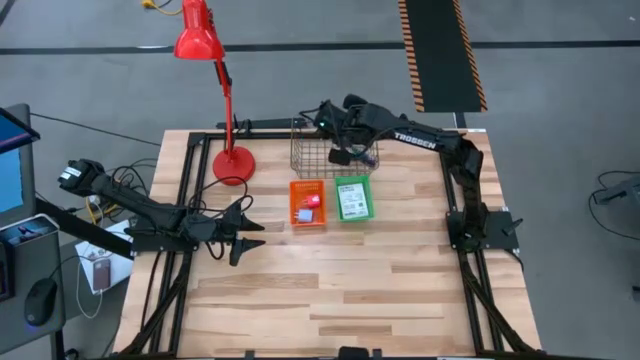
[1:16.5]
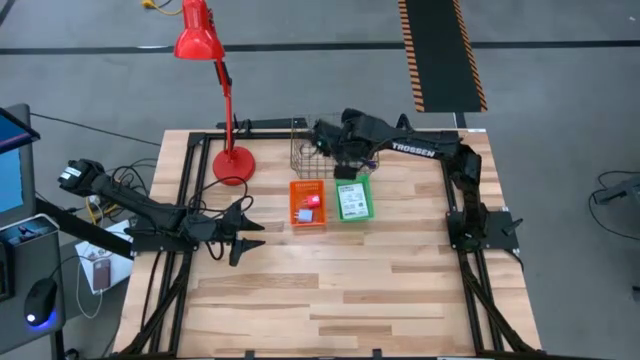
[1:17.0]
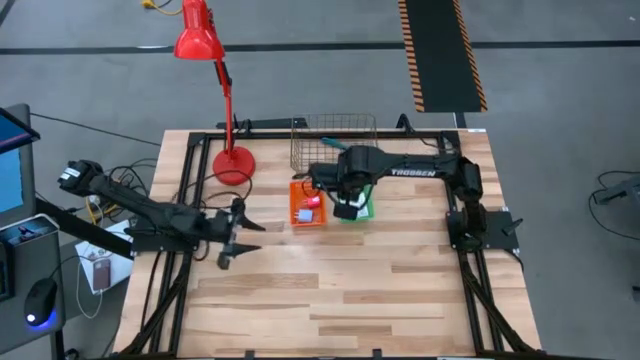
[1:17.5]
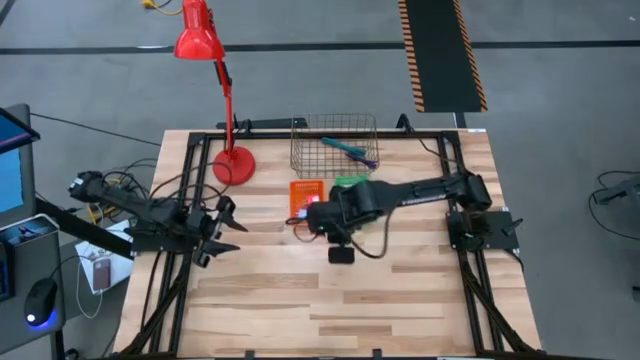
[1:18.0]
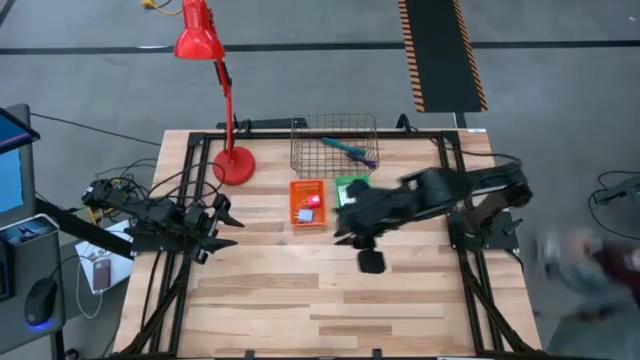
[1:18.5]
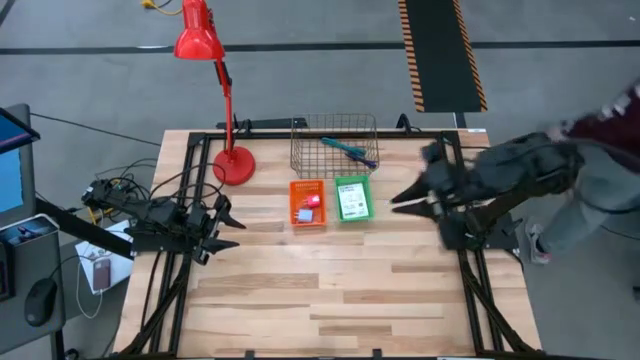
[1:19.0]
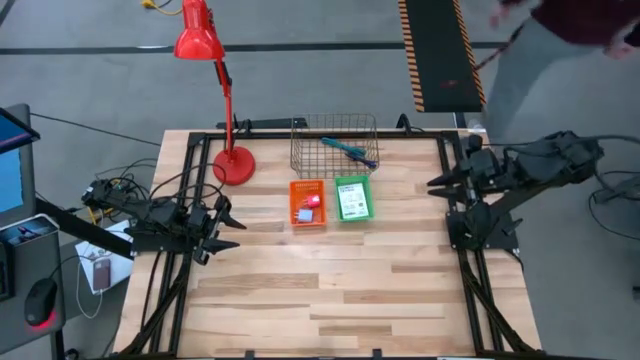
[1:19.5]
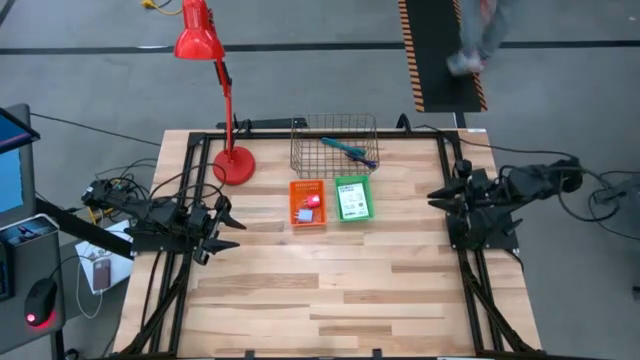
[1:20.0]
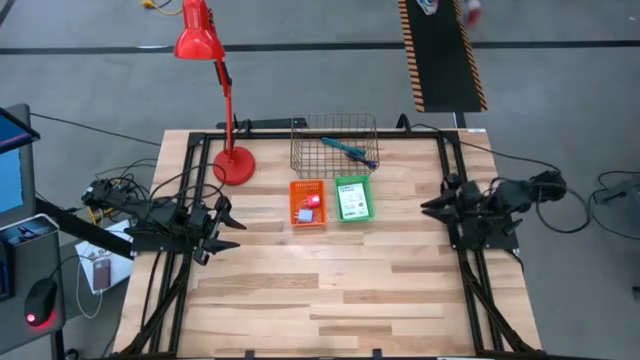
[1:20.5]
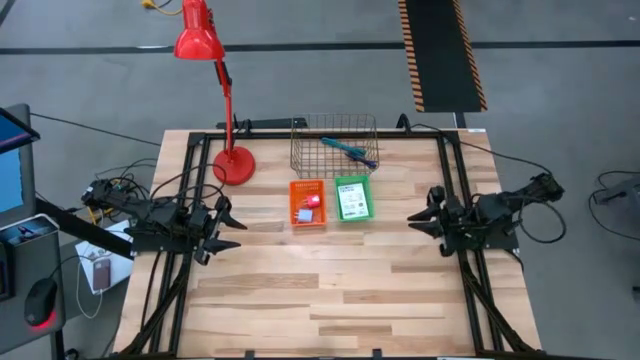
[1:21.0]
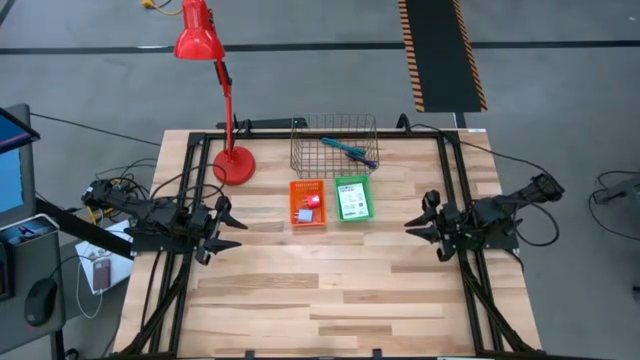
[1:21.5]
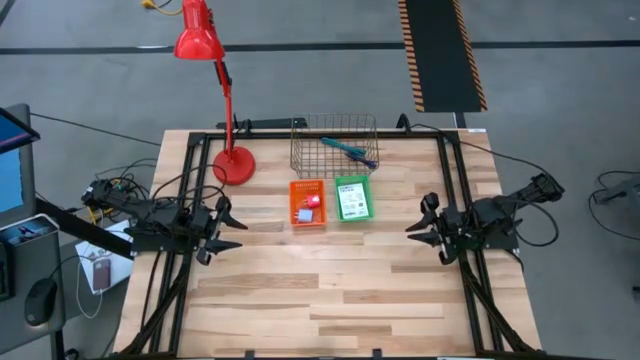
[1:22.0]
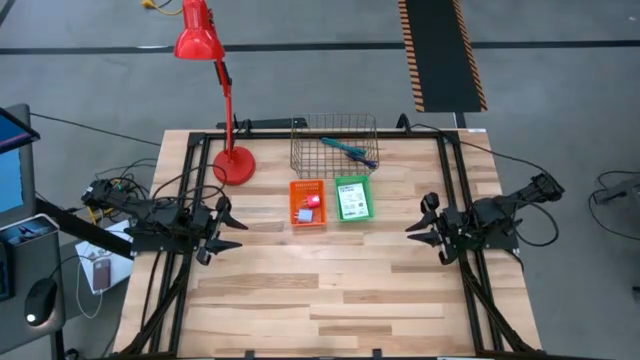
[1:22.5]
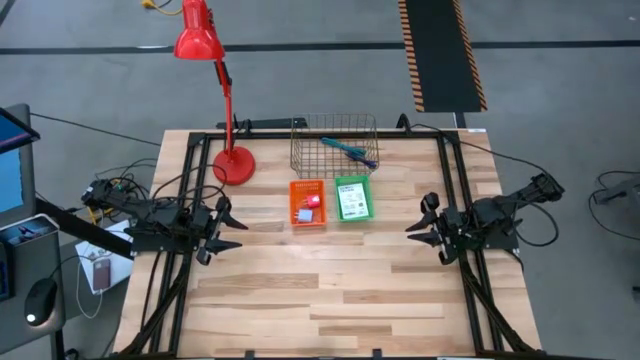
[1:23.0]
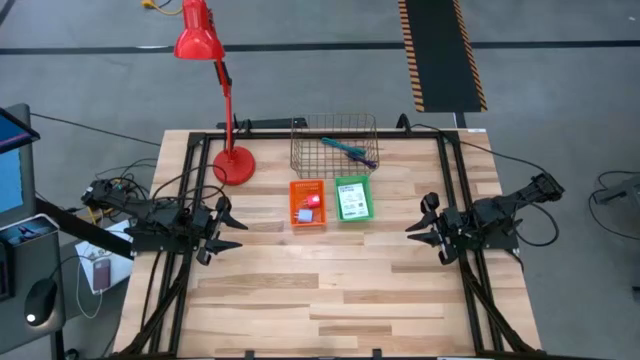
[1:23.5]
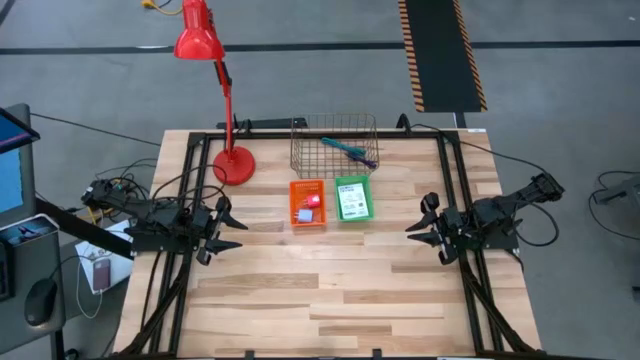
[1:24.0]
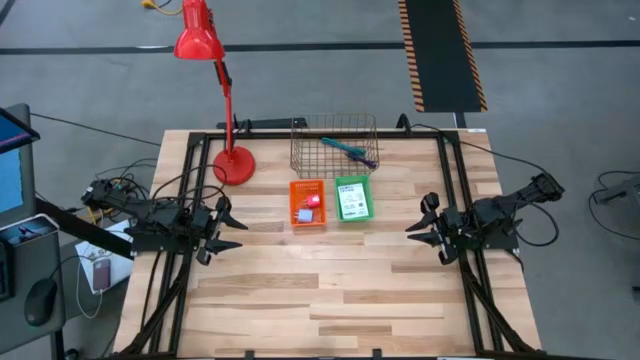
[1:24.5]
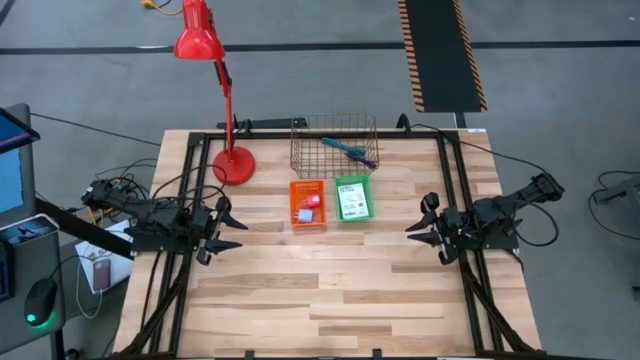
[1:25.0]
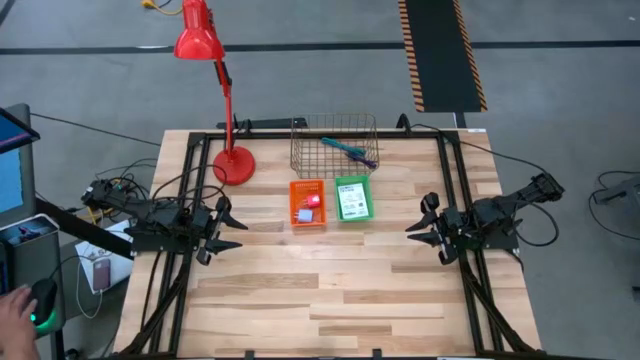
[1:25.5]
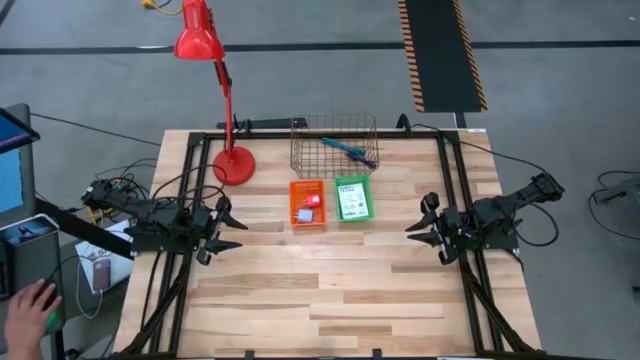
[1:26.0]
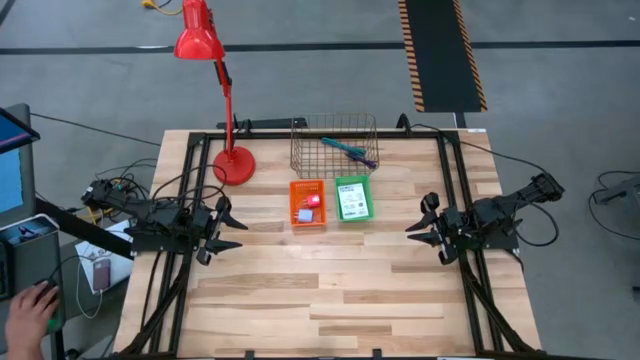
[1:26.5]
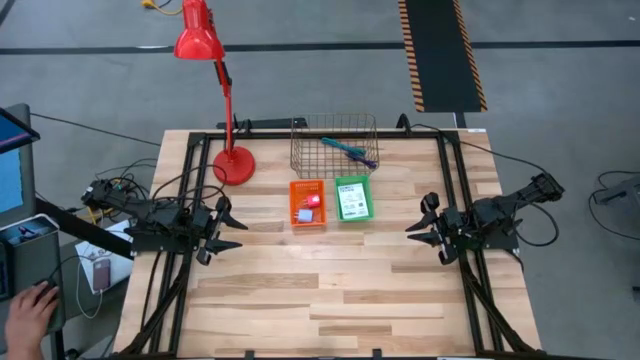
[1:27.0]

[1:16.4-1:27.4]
Task: Pick and place items into bin
Return to Home Position

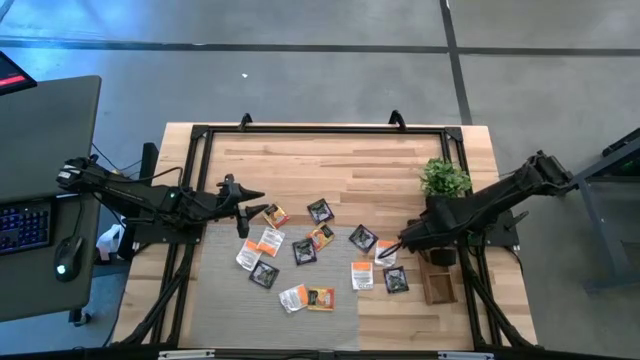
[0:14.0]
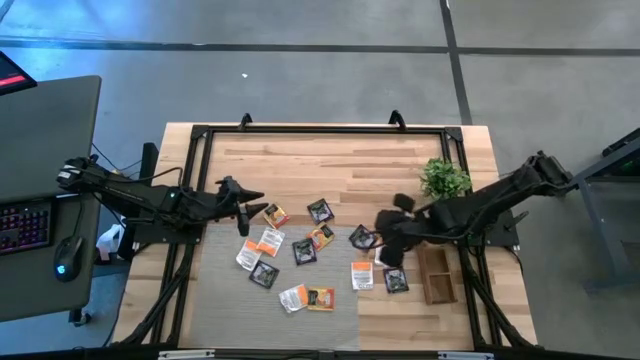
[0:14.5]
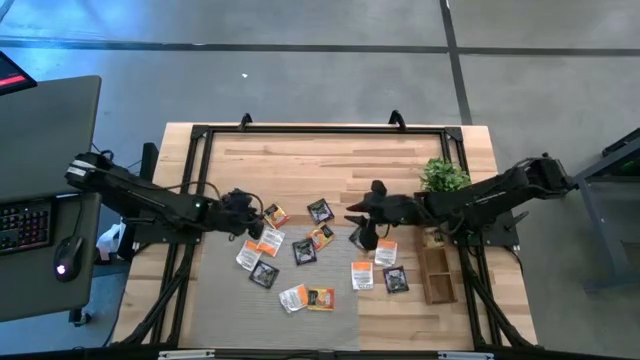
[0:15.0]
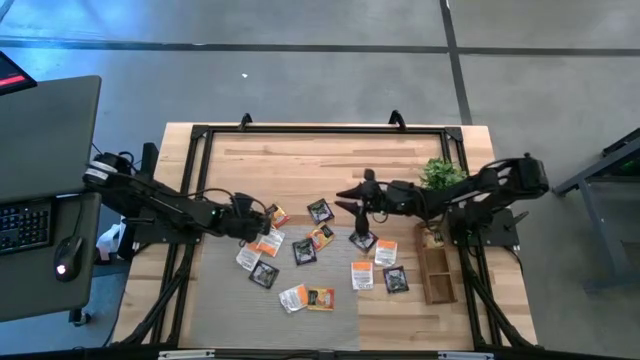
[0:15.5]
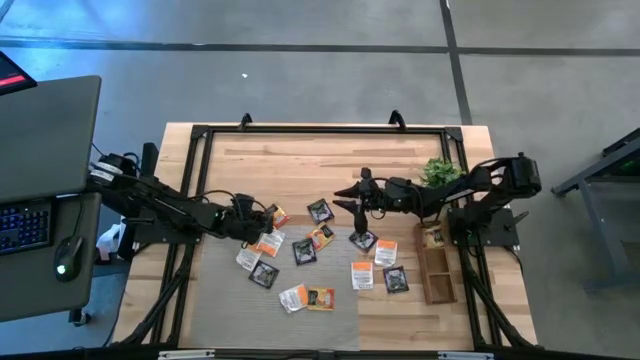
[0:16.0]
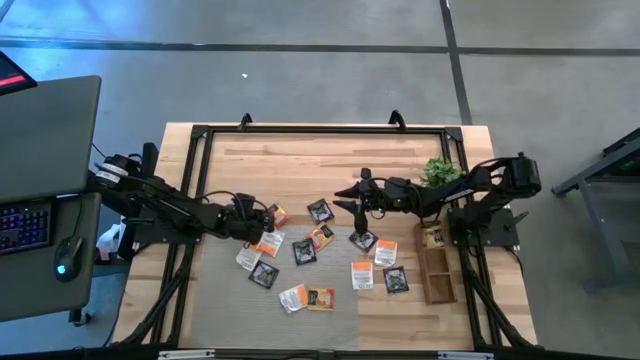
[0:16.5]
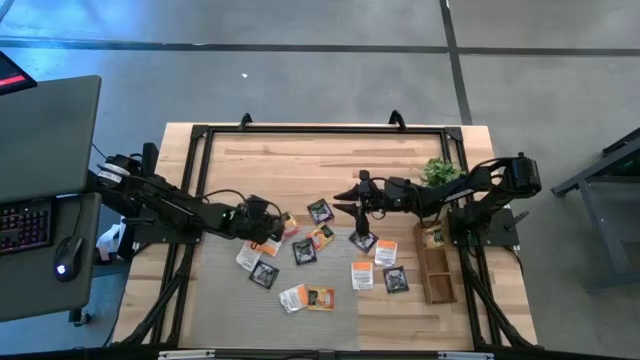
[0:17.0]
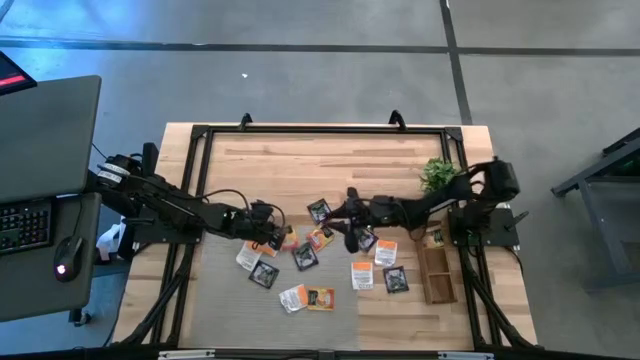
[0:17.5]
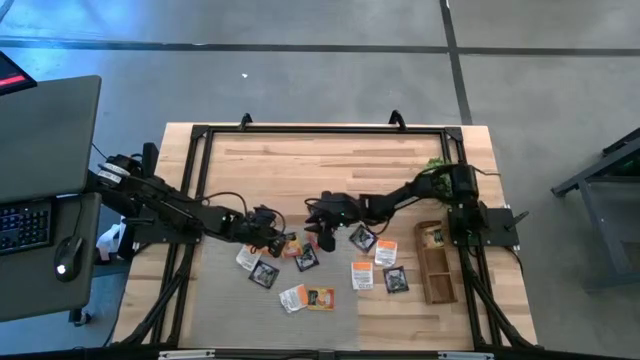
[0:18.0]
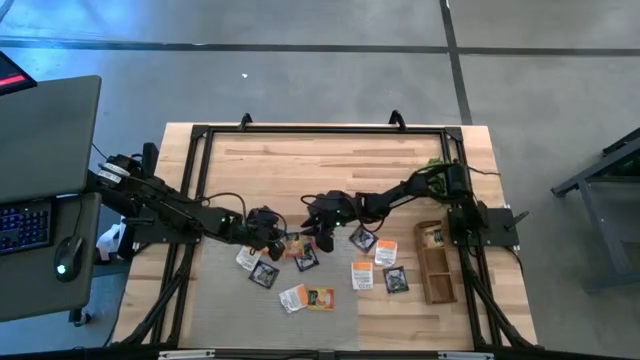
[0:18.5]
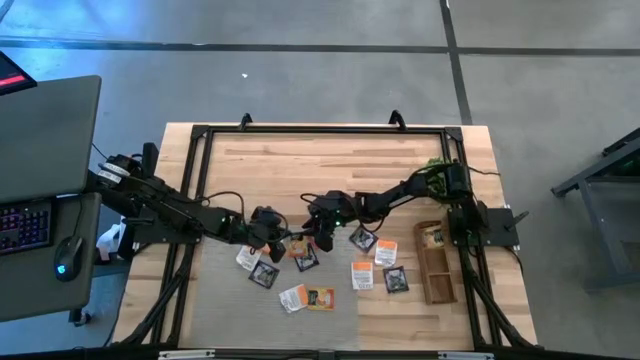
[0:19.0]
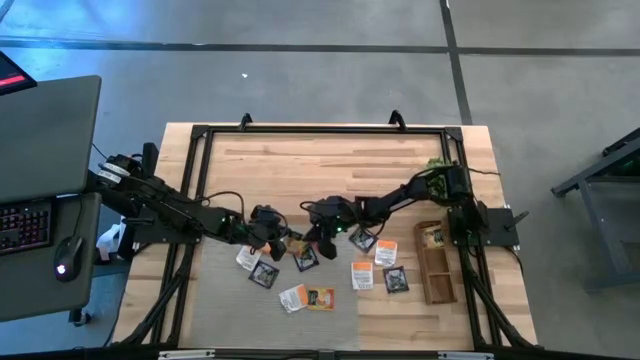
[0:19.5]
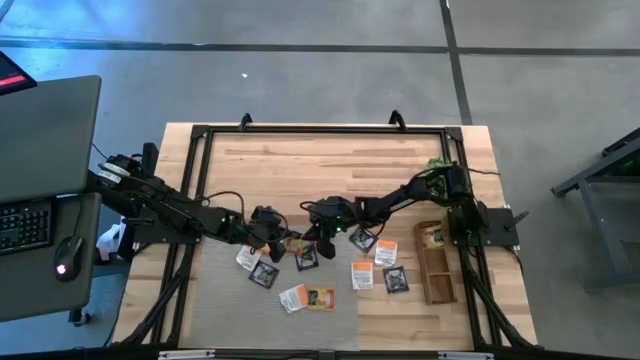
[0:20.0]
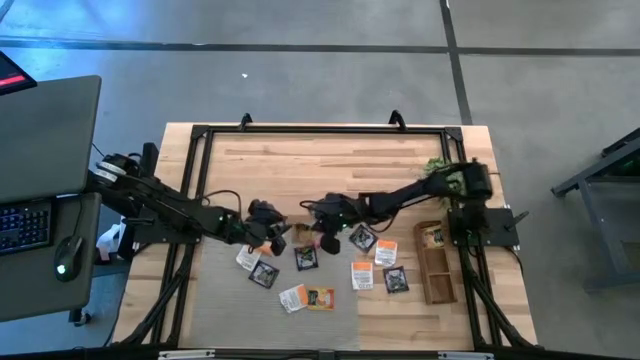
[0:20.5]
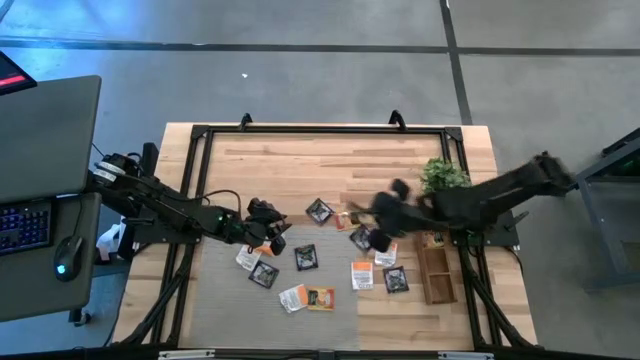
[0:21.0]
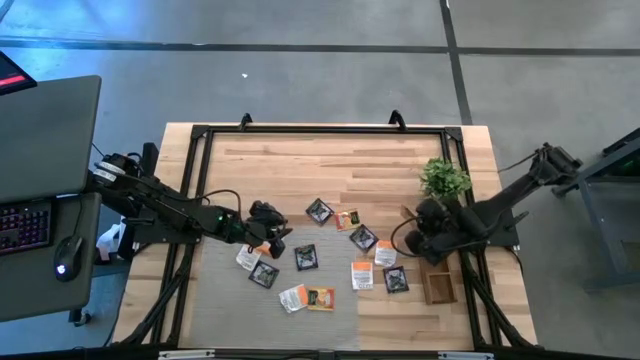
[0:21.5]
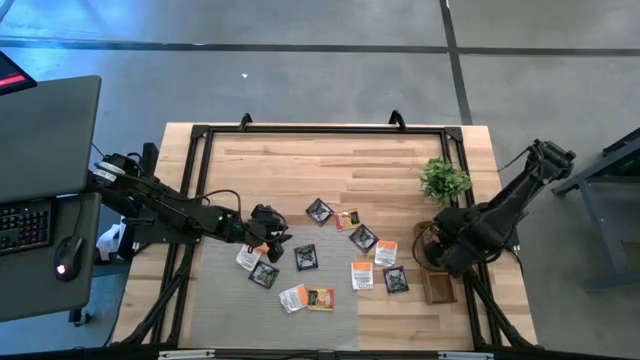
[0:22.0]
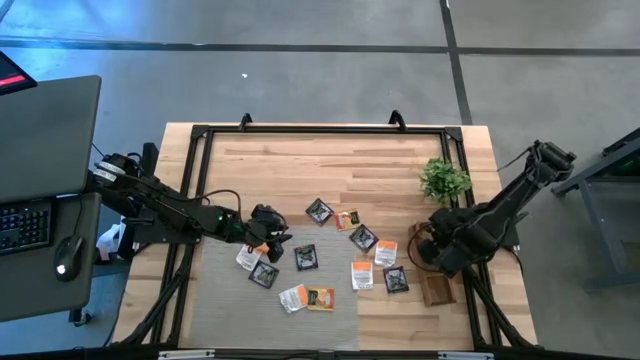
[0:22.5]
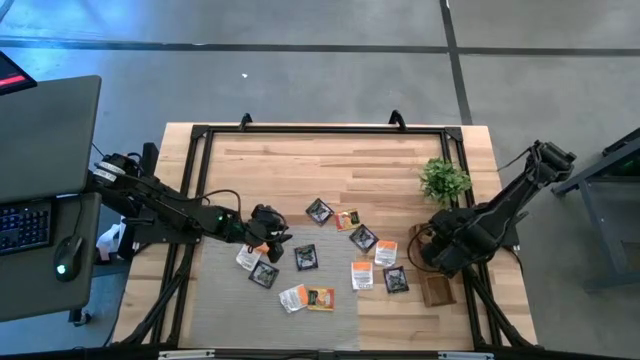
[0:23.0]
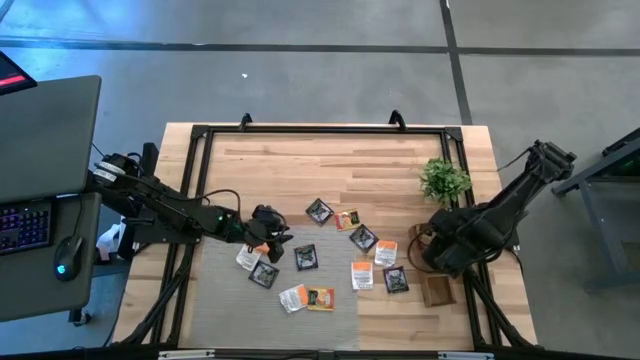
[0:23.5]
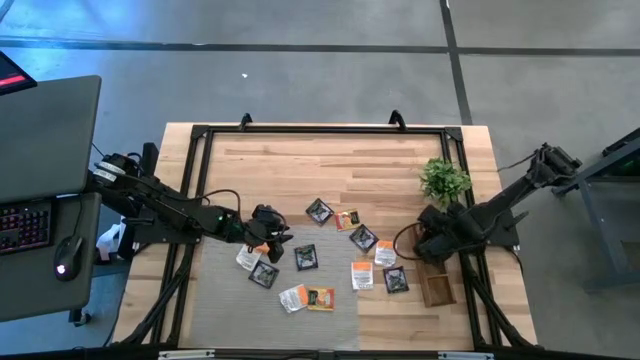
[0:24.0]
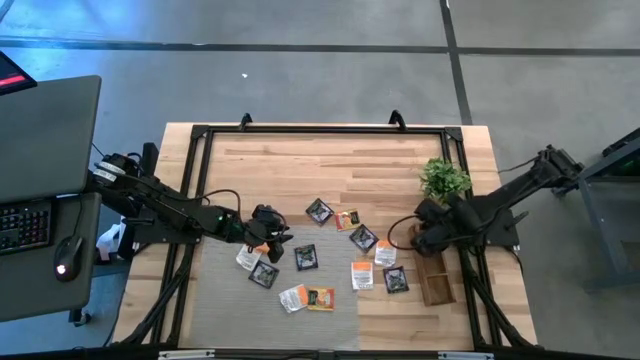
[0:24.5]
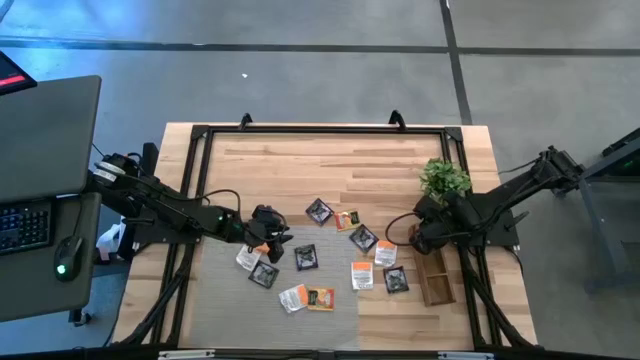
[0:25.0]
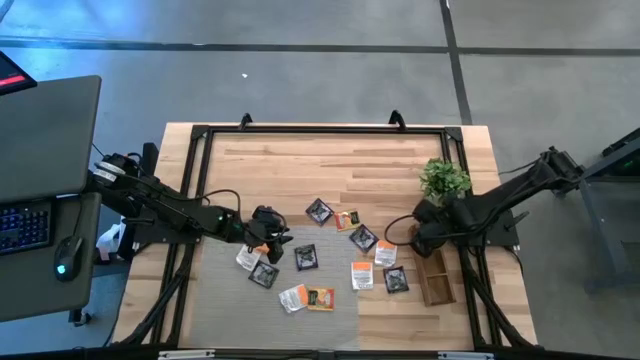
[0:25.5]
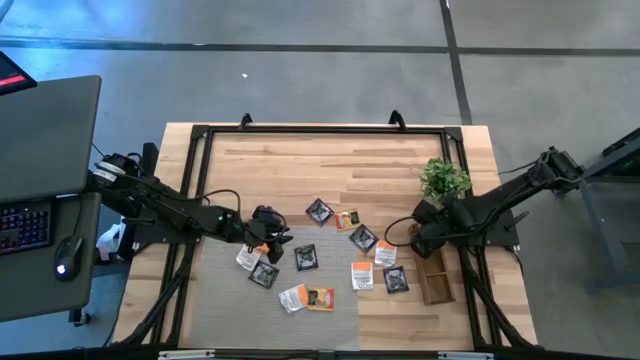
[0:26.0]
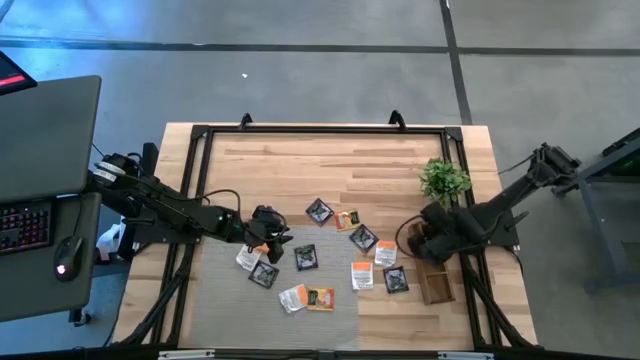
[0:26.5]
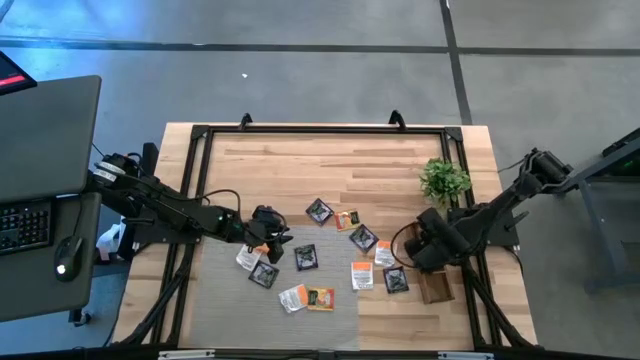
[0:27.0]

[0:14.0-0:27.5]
Task: Pick & Place Tea
Put the orange tea bag into the top section of the wooden organizer
